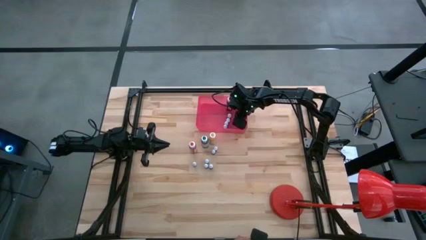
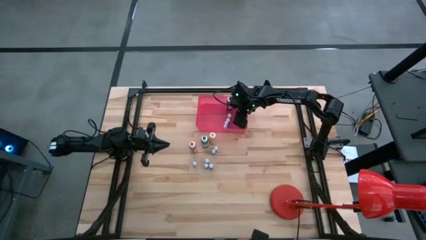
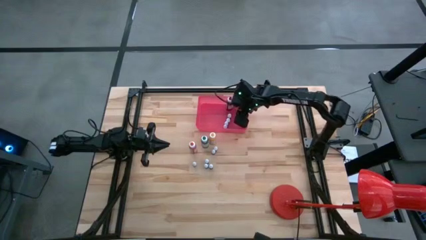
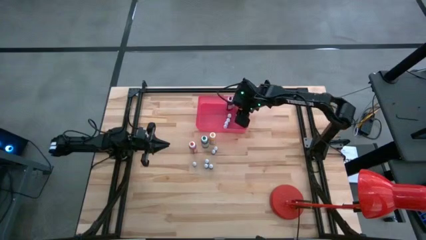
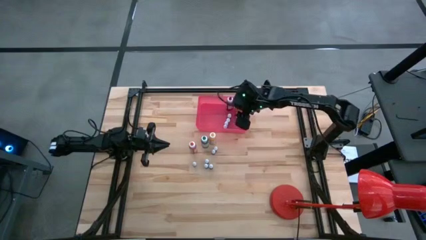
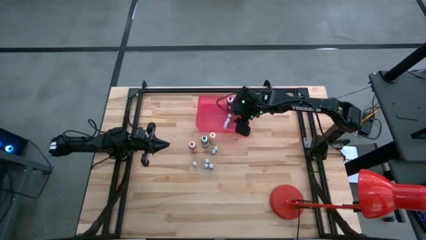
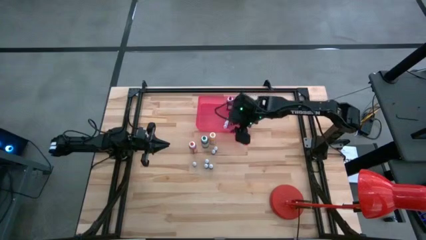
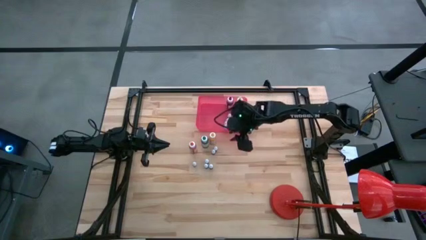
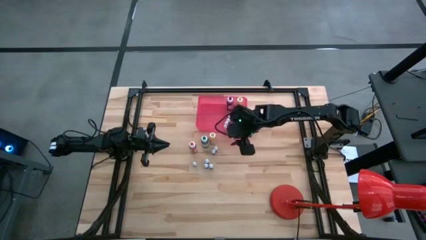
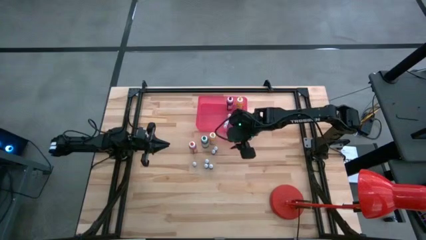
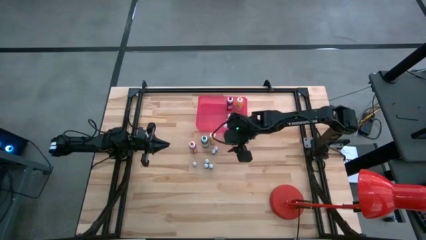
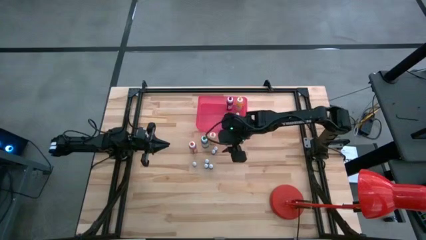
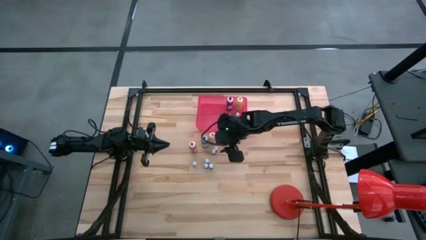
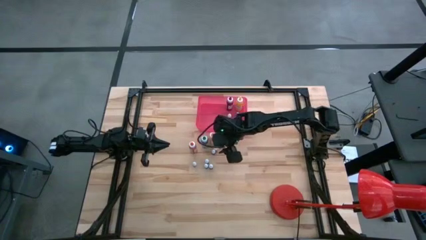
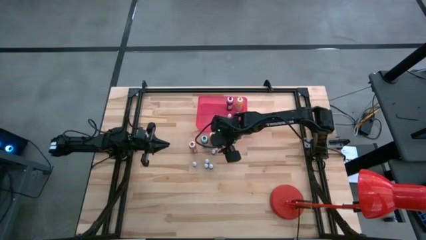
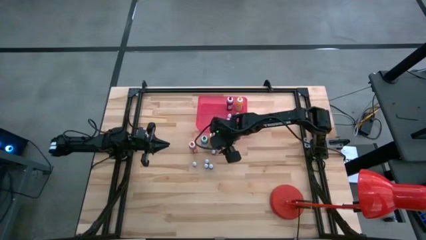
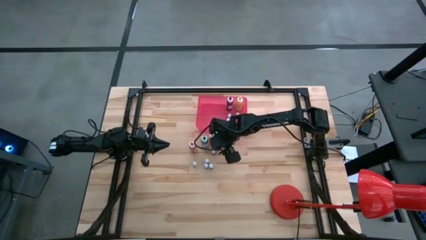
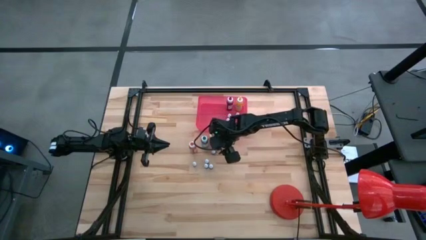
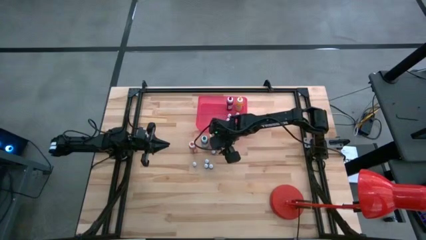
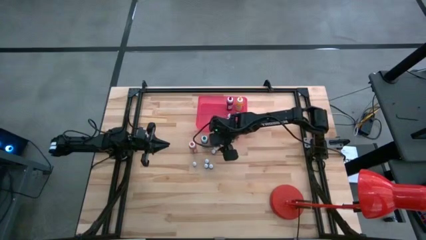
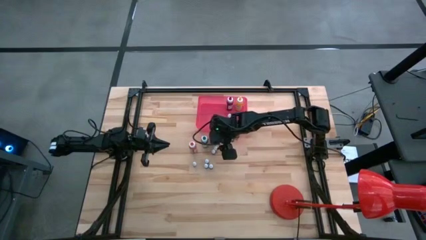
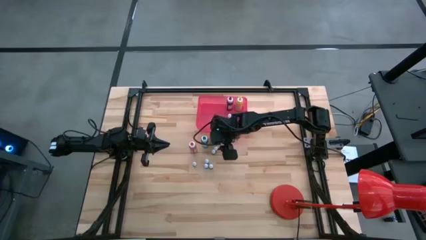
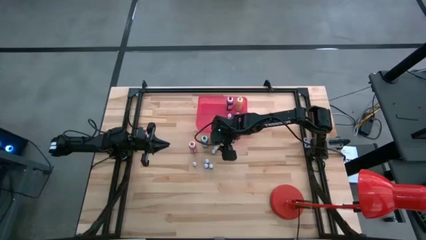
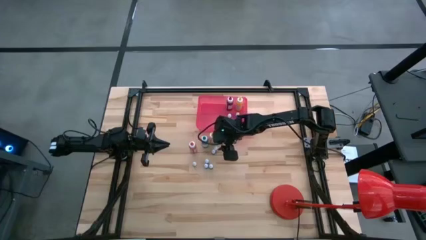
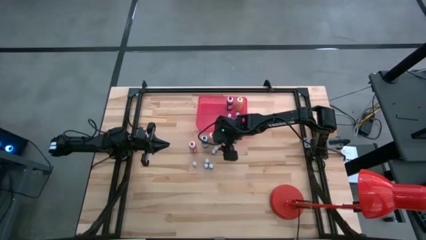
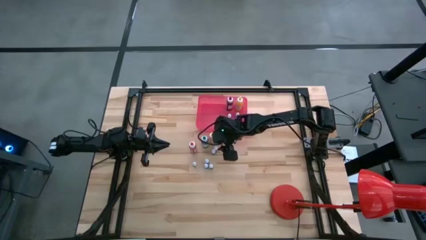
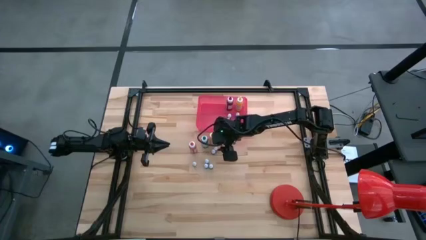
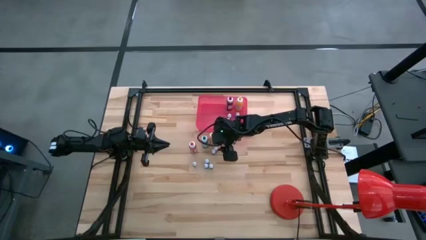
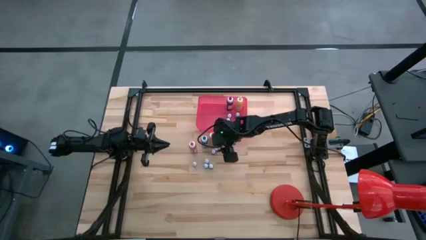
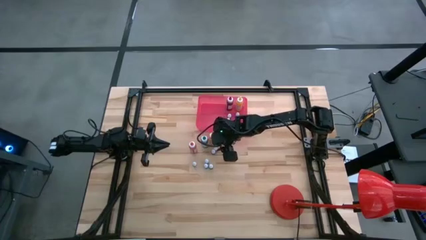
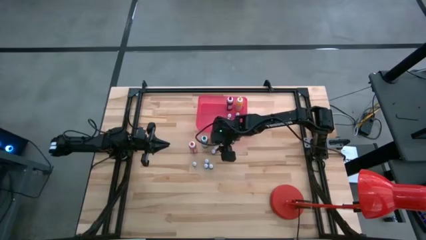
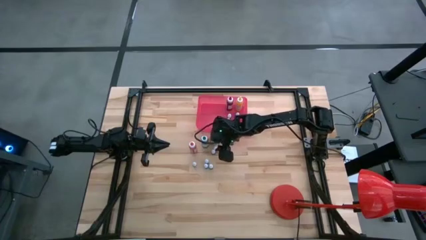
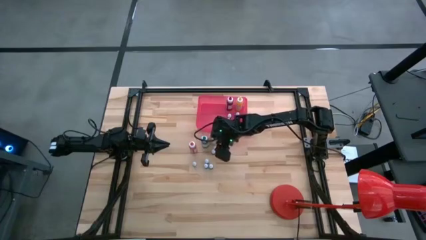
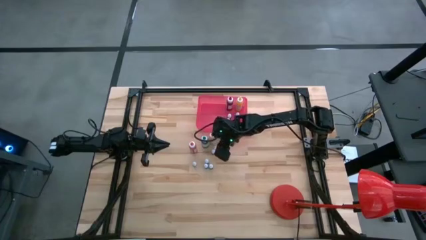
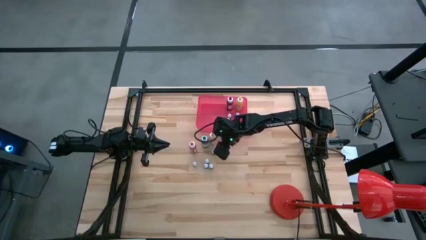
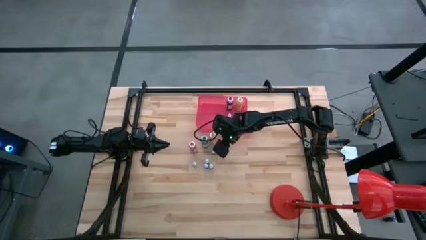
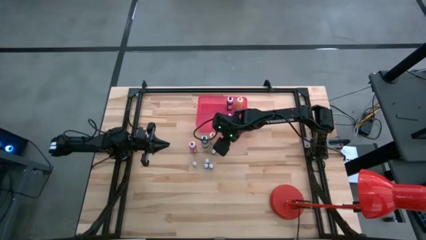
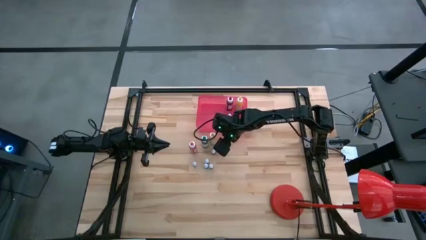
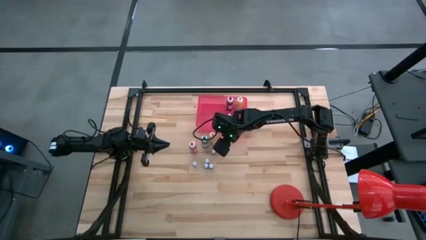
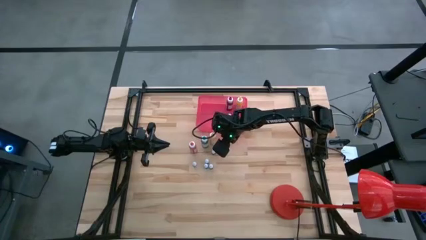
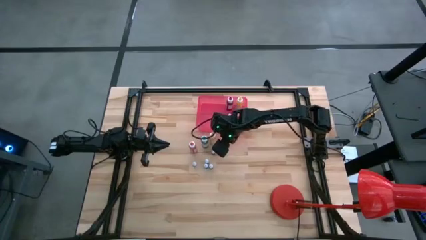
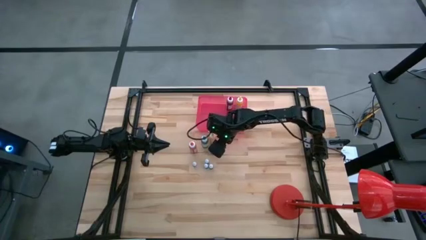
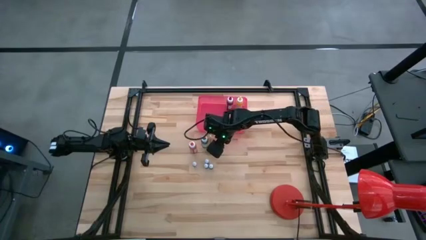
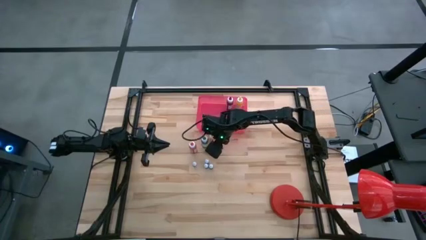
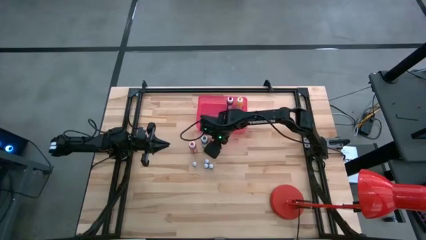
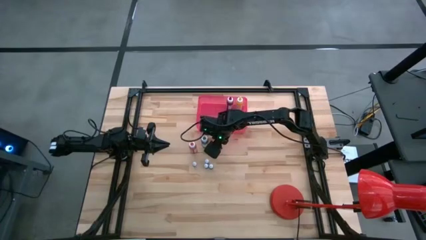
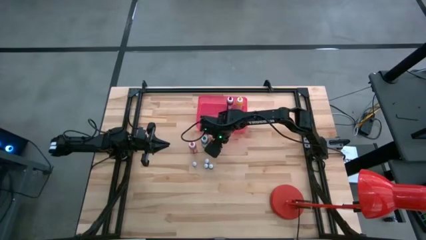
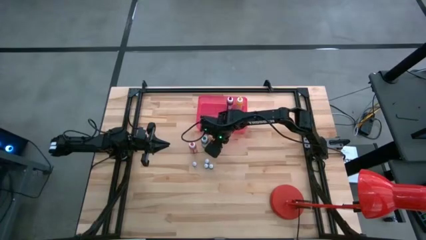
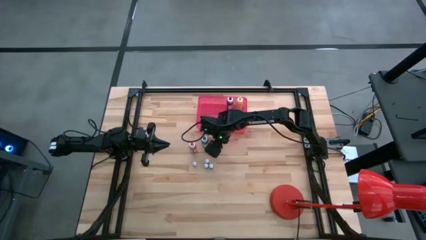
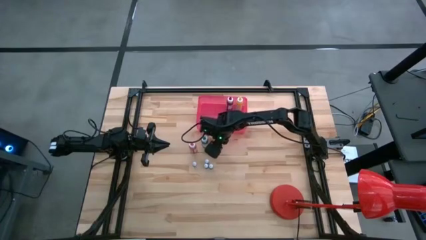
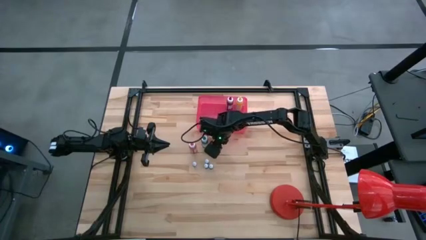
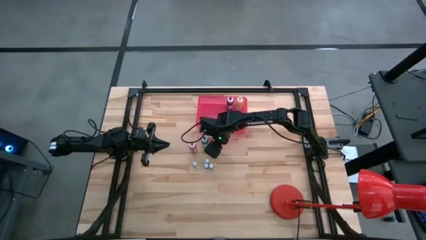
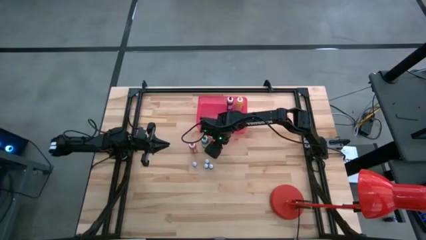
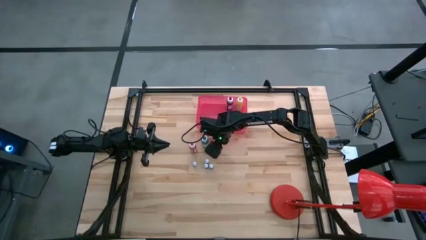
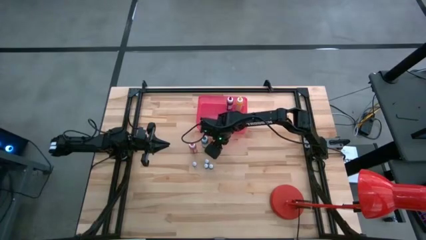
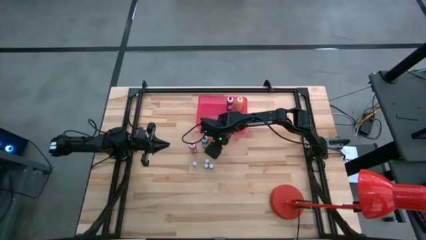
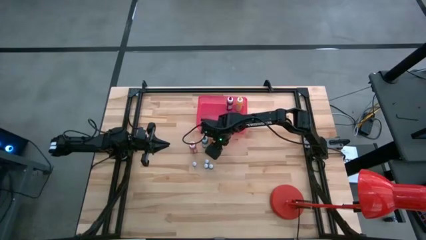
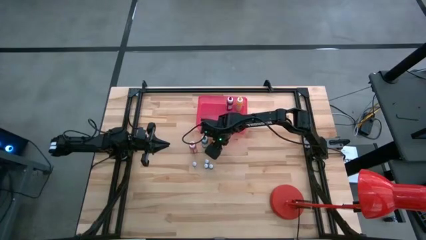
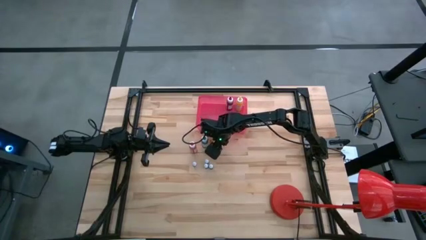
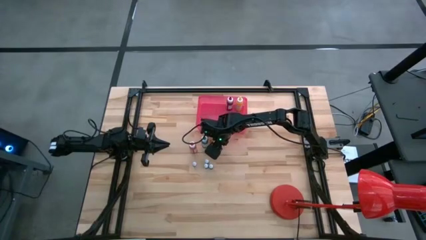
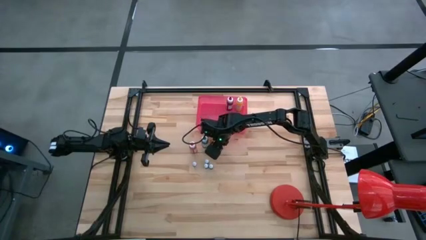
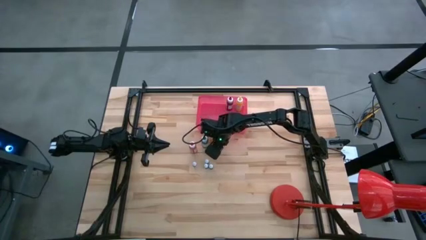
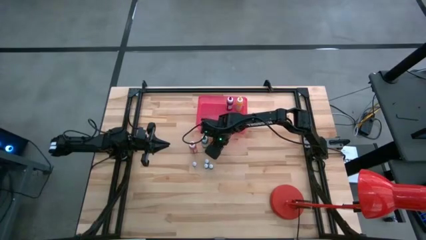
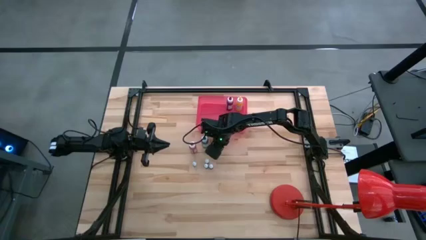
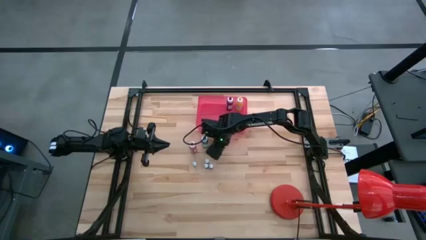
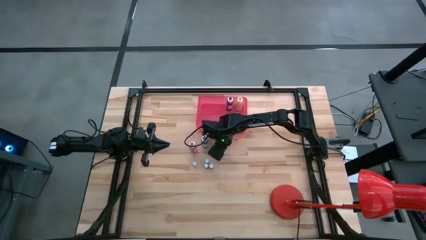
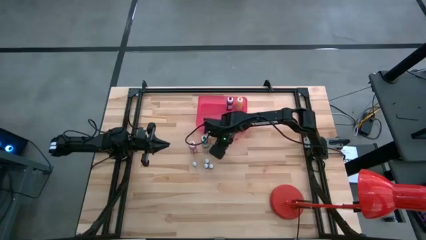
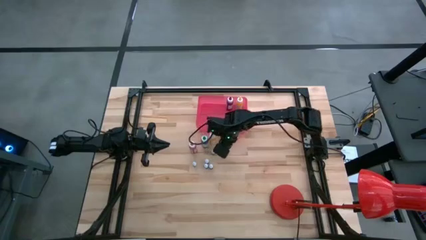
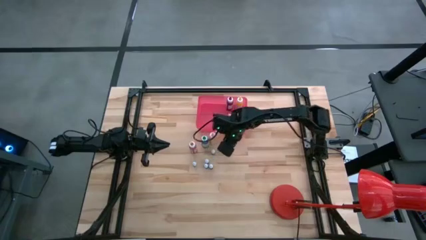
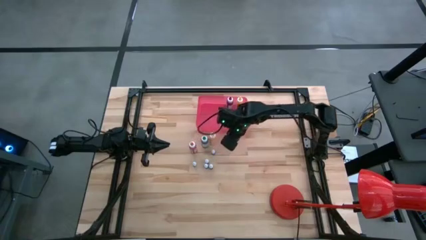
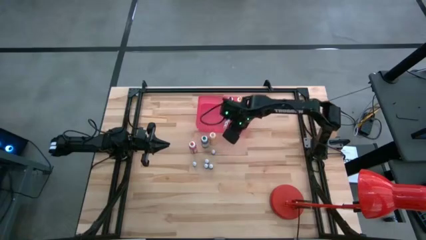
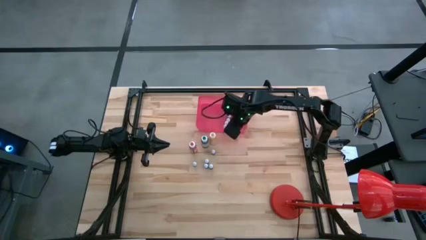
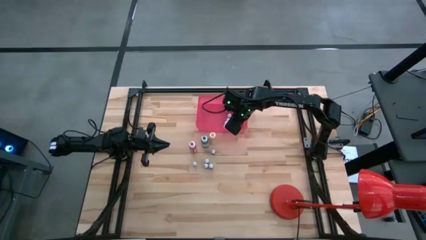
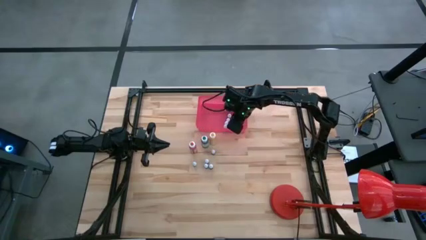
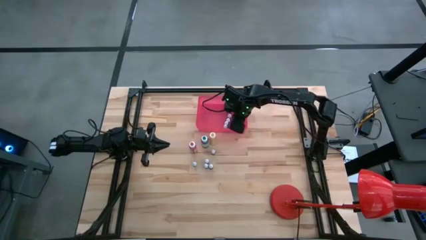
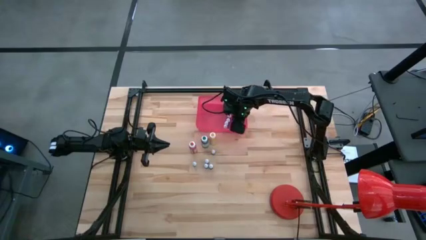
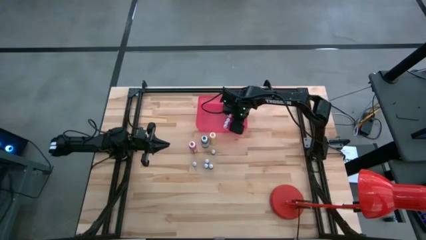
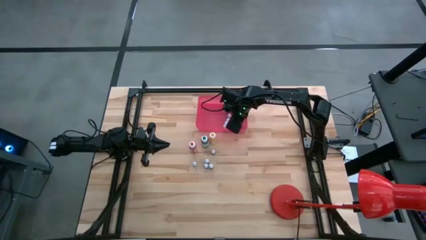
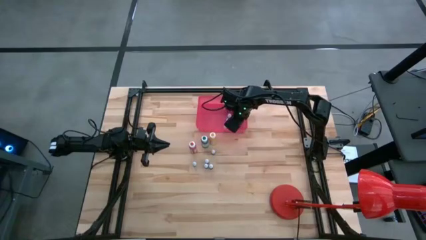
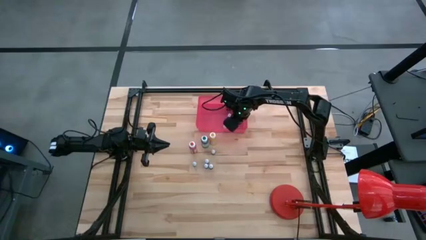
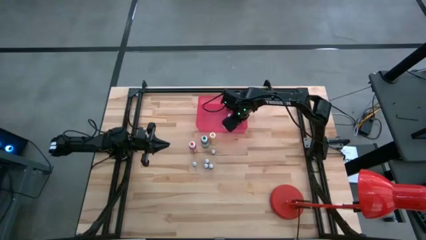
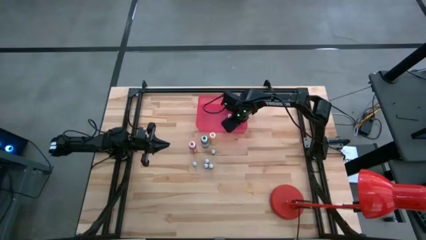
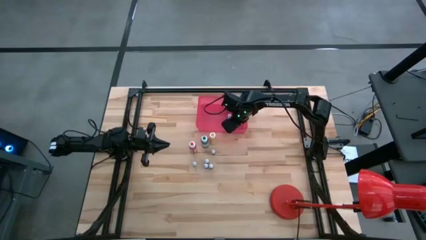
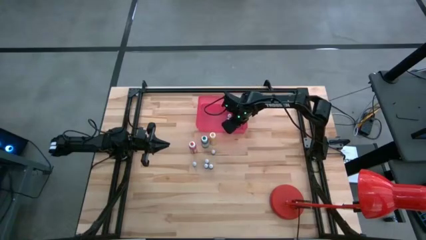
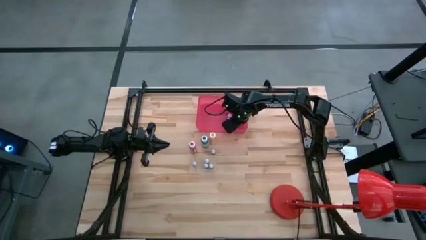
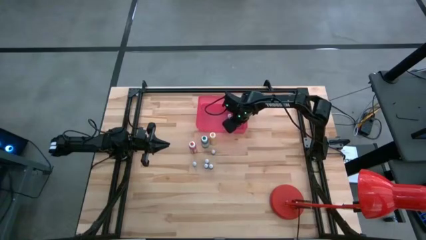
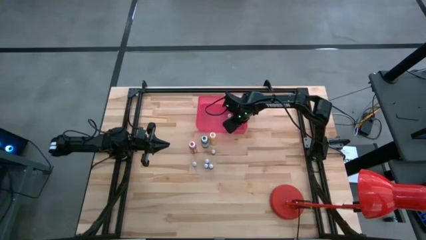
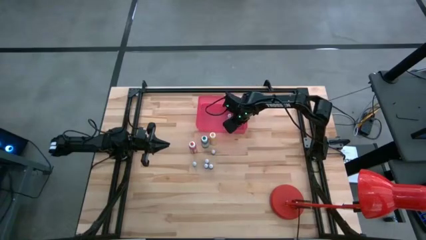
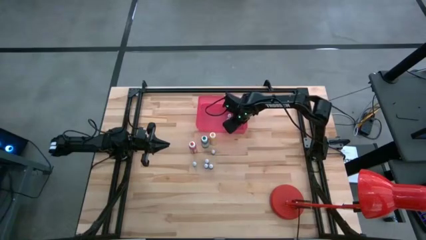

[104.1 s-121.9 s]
Task: Pick & Place food coloring
Put the small red food coloring bottle into the pink bin
